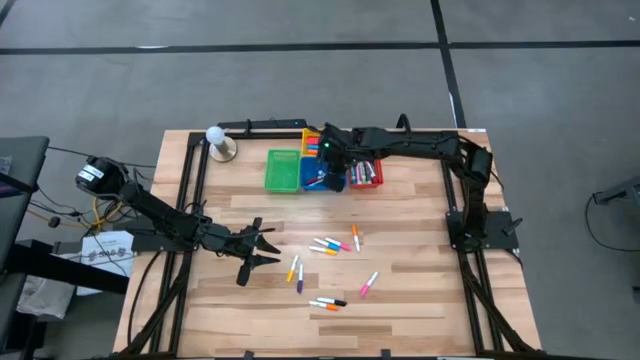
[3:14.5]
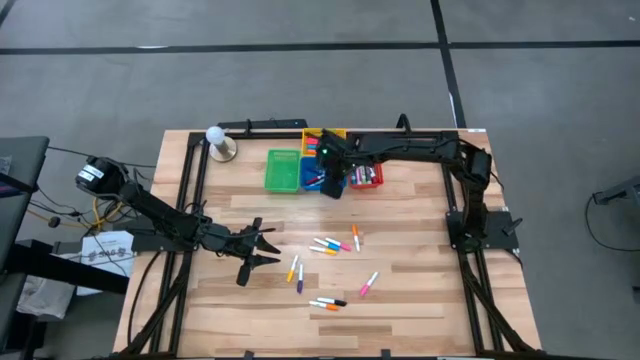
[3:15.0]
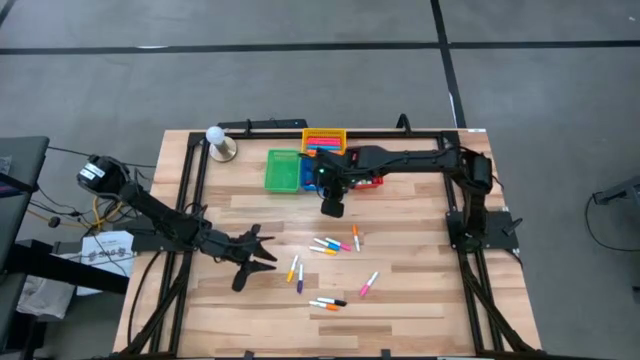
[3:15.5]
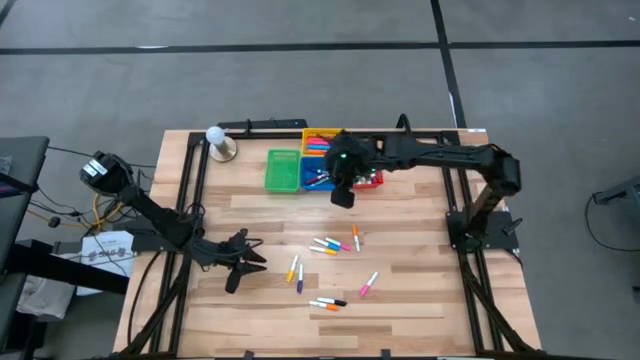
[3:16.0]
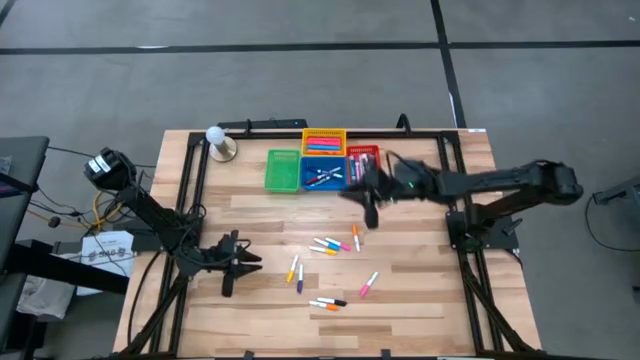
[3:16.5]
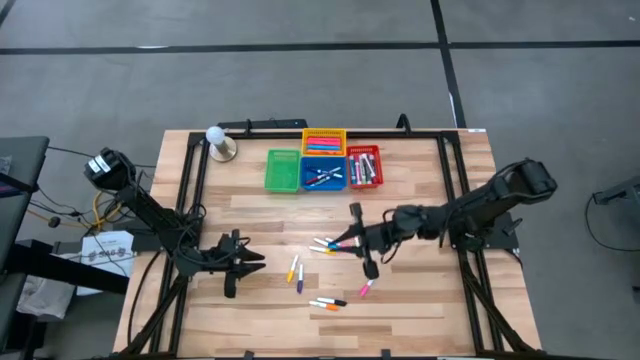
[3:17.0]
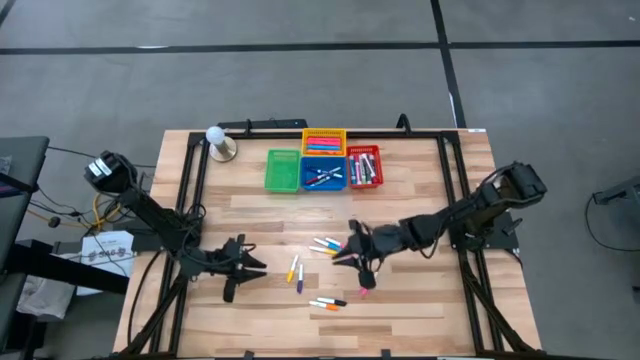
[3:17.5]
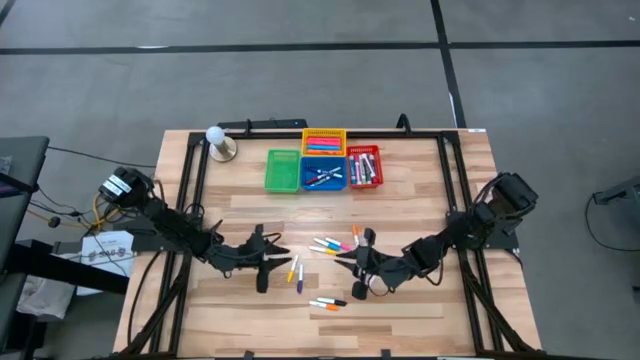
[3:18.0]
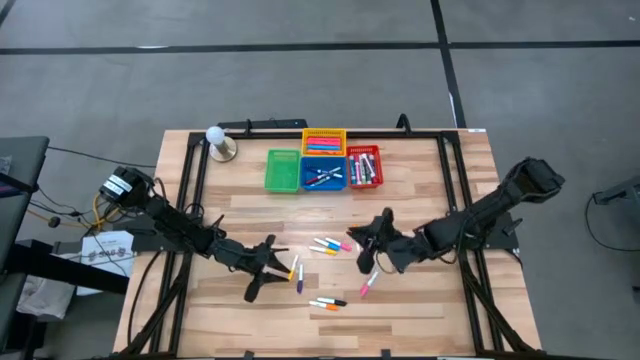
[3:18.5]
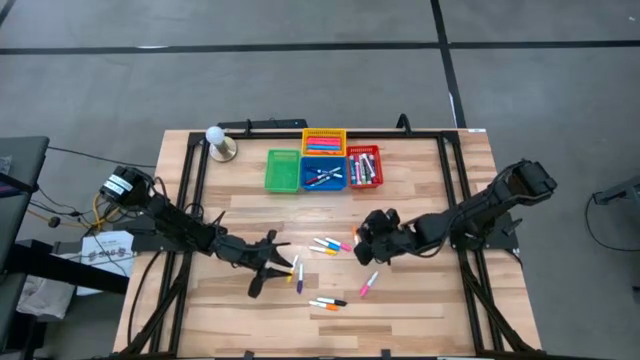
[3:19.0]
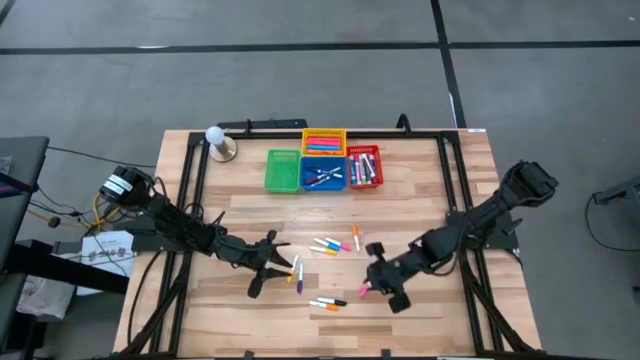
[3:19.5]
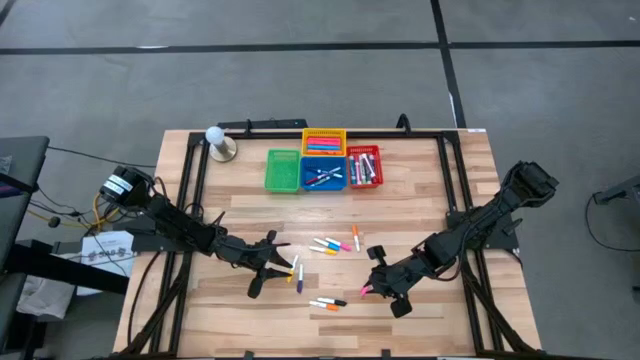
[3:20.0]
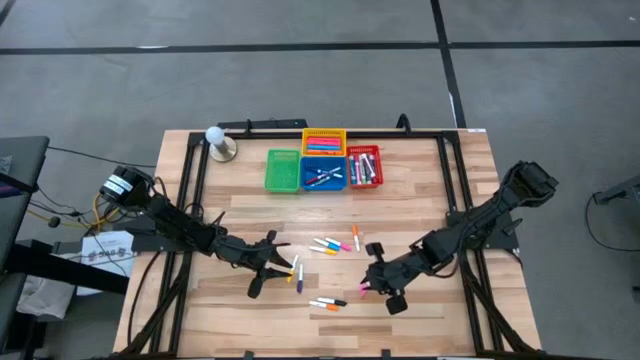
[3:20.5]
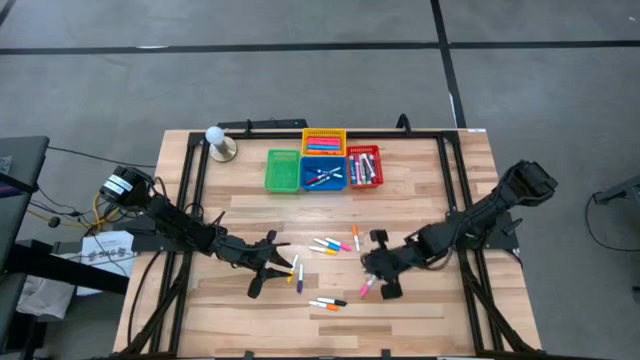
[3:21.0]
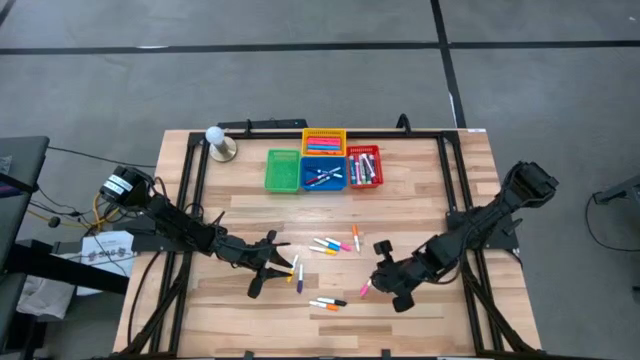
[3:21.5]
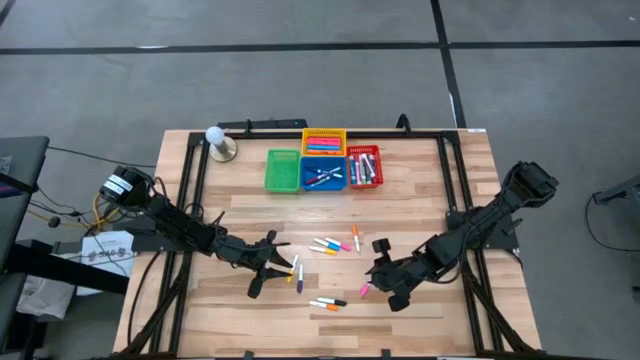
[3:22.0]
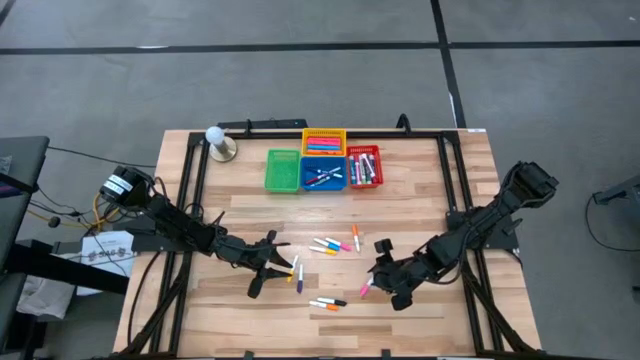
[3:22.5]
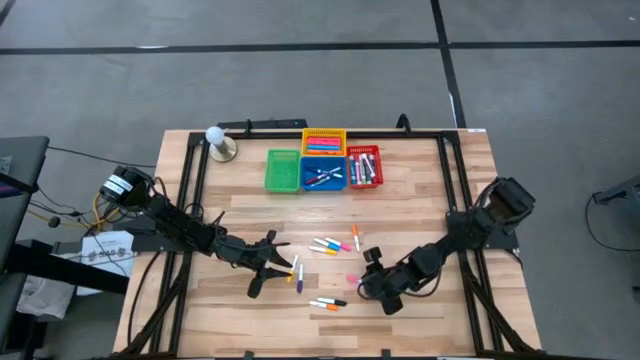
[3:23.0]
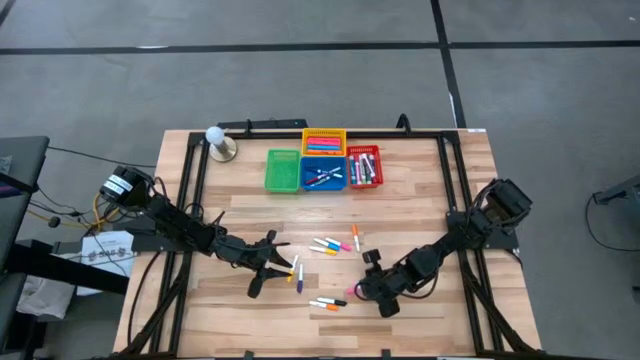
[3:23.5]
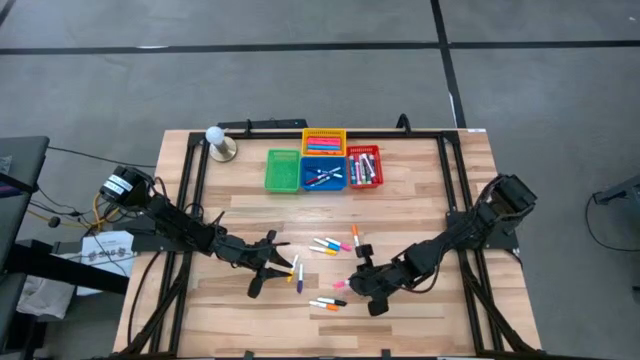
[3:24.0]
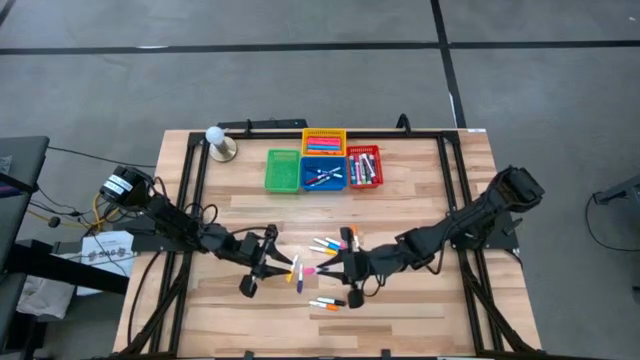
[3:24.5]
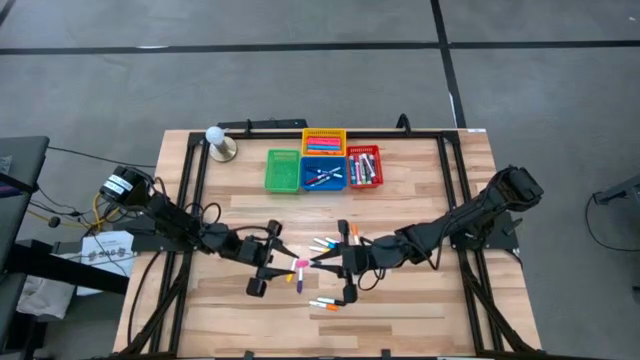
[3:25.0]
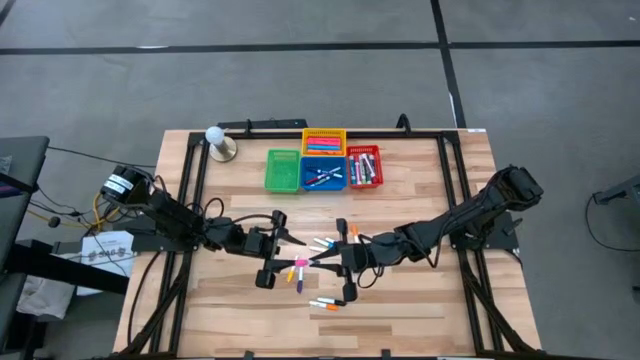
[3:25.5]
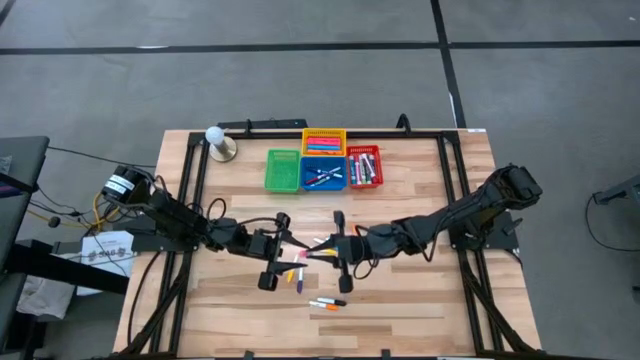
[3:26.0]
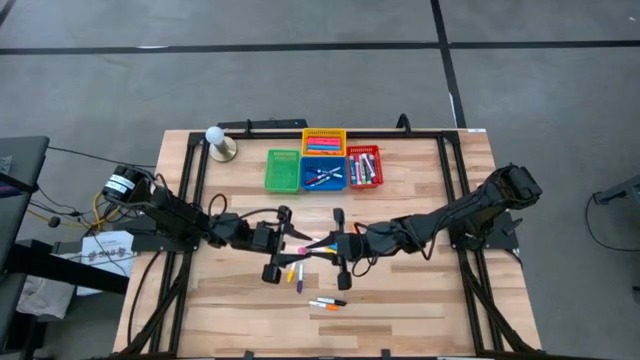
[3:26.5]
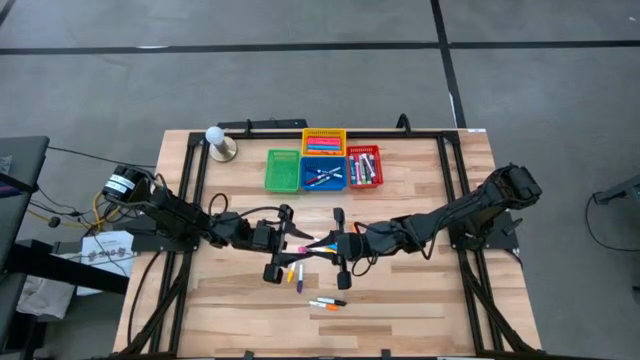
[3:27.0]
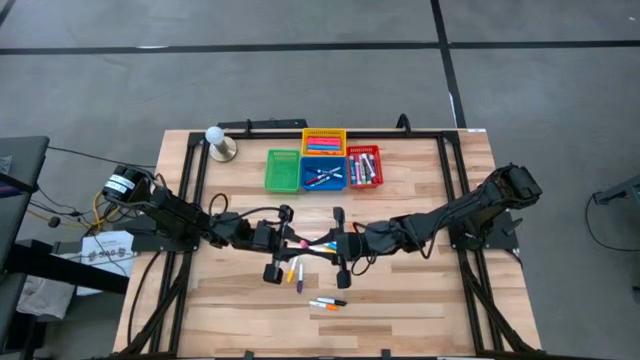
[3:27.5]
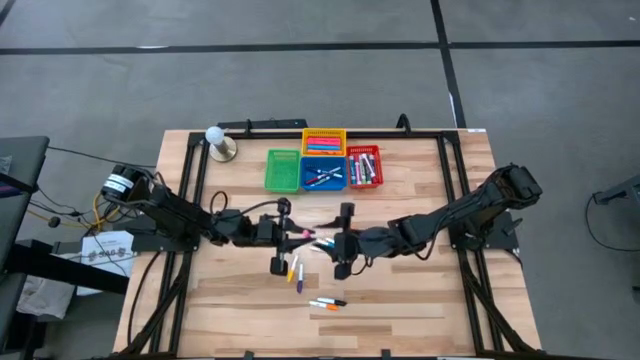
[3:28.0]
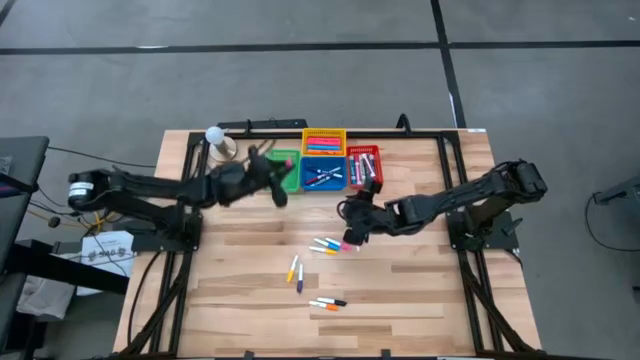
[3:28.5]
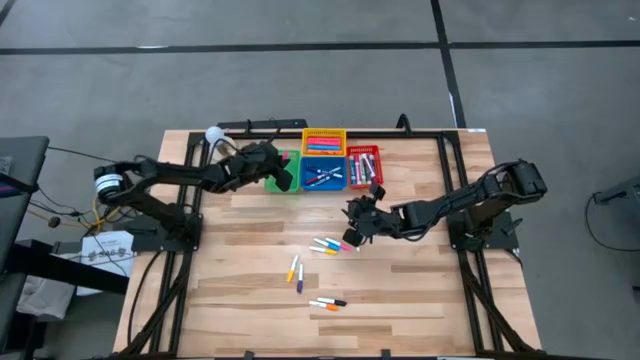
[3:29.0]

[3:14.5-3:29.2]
Task: Pick & Place Markers
Put the bottom small pink highlighter pen into the green bin

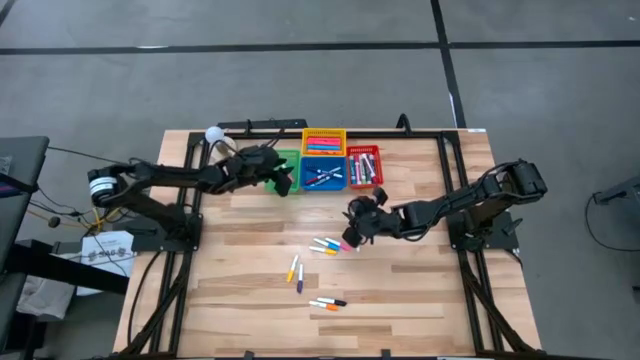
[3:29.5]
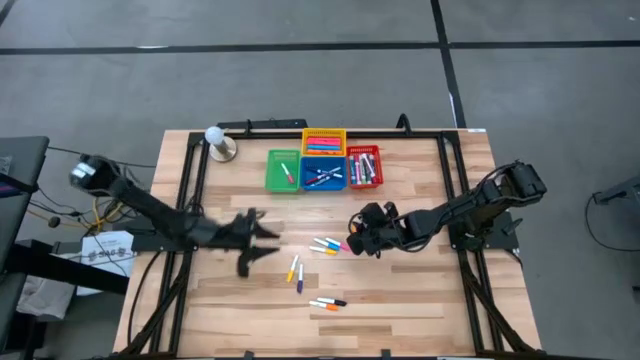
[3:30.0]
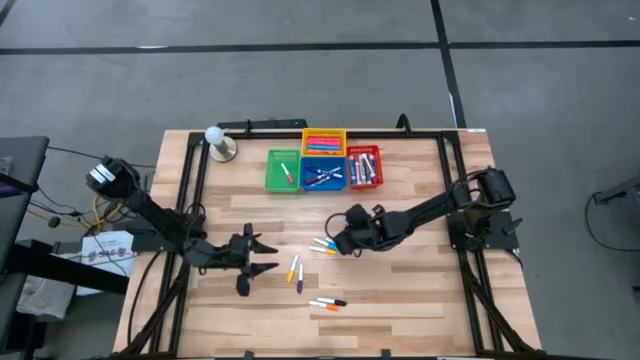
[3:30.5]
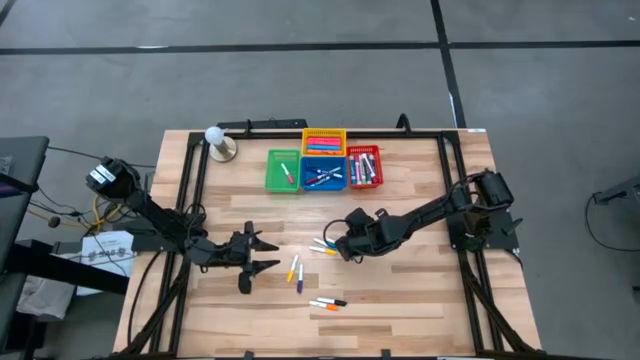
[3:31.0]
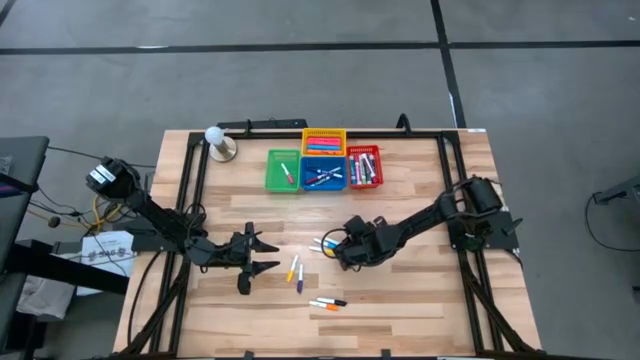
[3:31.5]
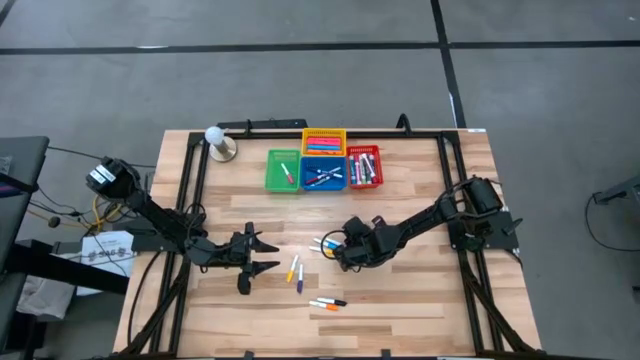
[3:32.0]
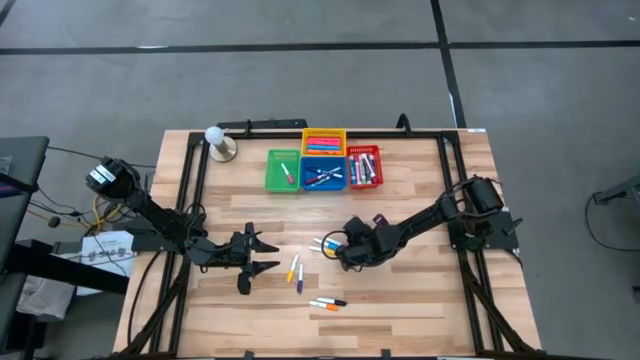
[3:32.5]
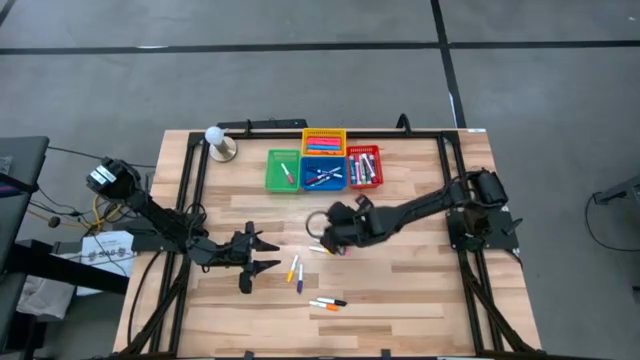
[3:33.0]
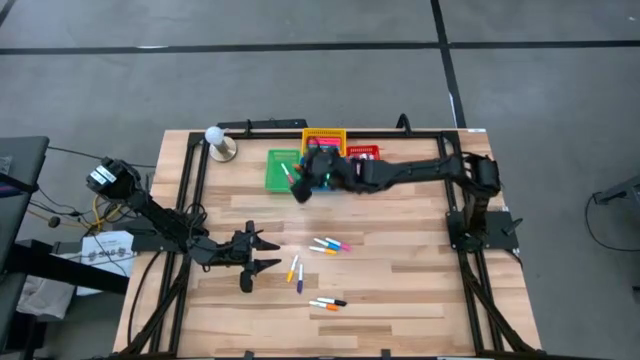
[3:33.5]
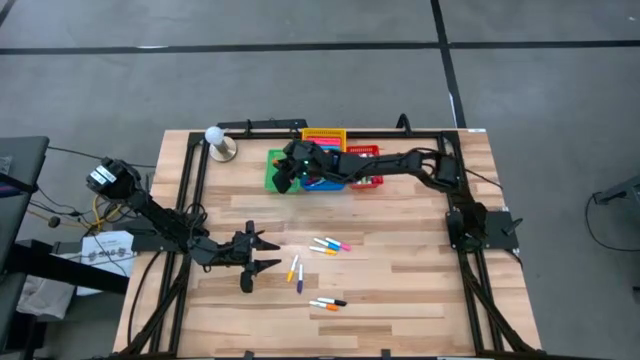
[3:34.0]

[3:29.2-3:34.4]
Put the top small orange highlighter pen into the green bin

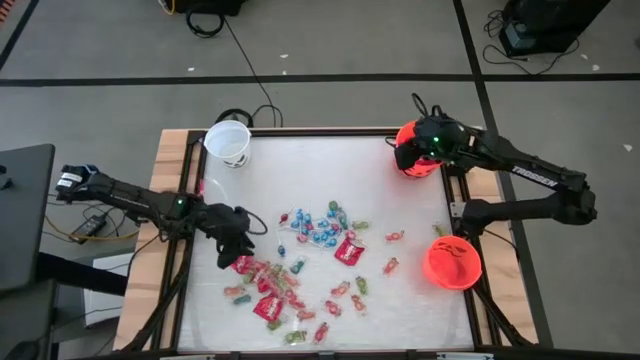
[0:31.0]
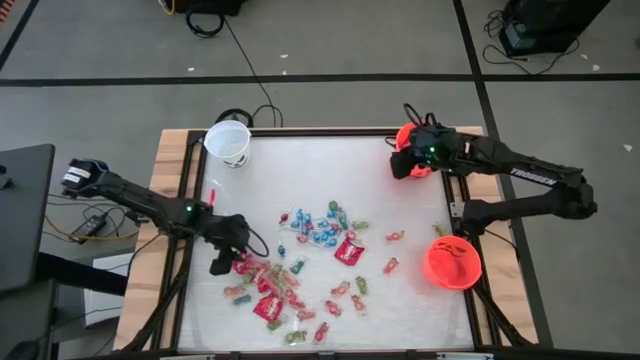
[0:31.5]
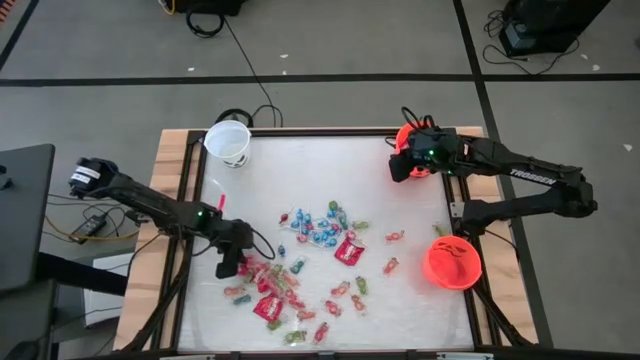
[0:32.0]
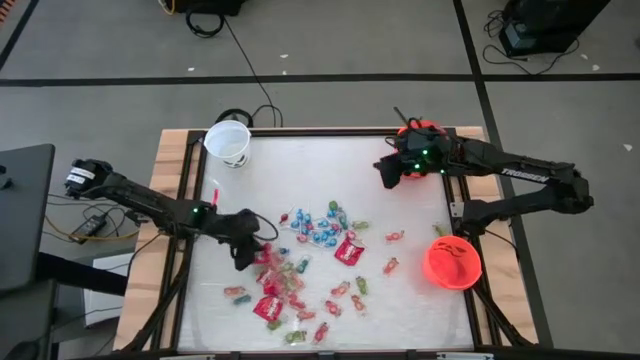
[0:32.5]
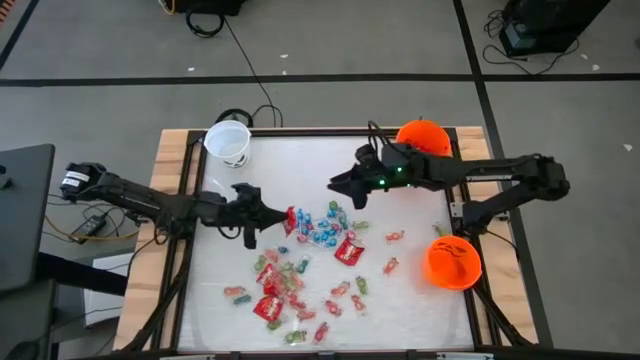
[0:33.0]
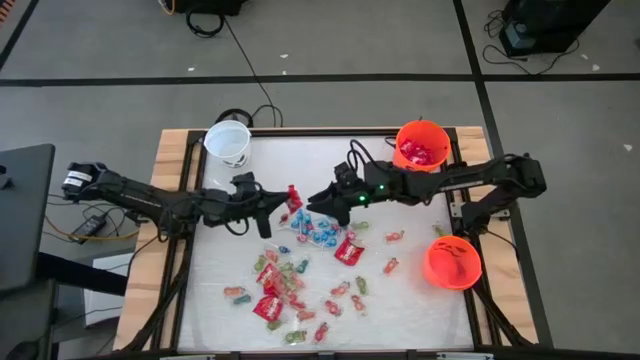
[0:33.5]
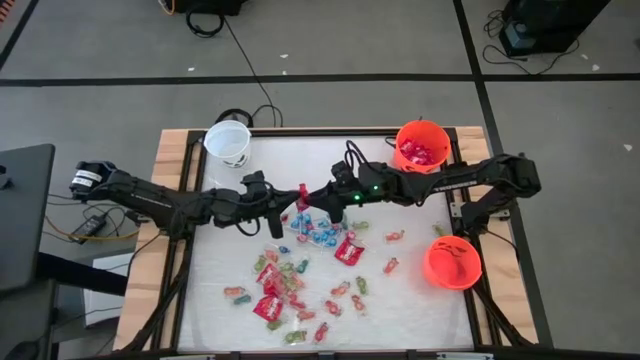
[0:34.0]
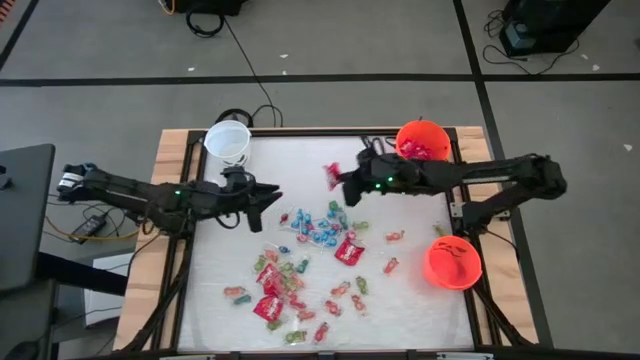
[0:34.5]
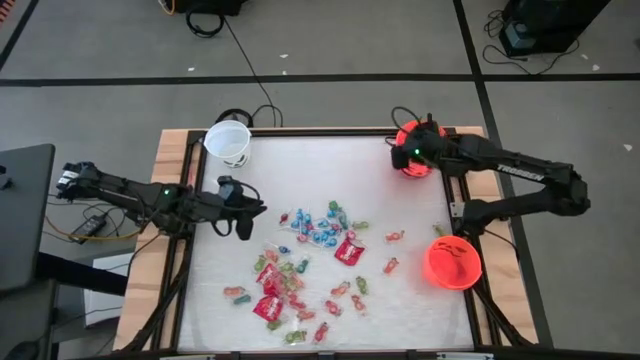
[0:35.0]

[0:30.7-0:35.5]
Task: Sort candy by brand, put in halloween buckets
Put the red candy into the top orange bucket
